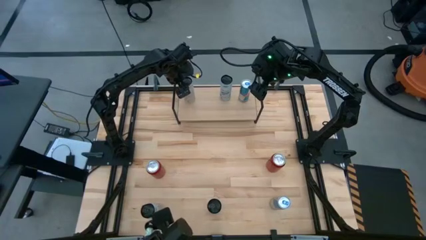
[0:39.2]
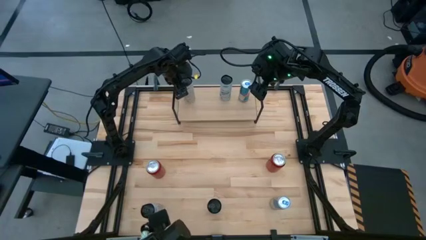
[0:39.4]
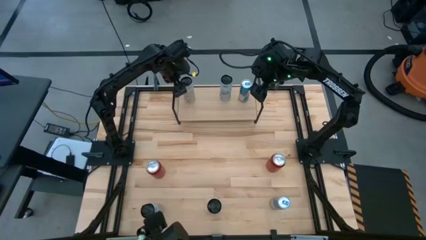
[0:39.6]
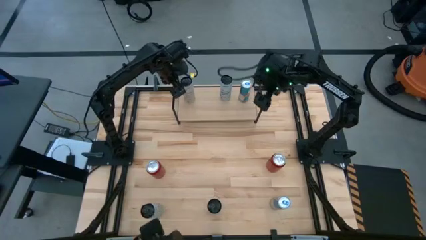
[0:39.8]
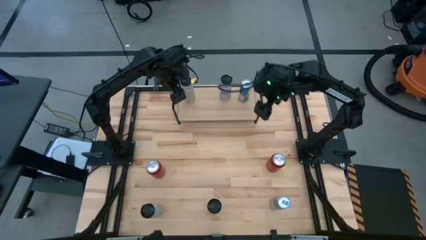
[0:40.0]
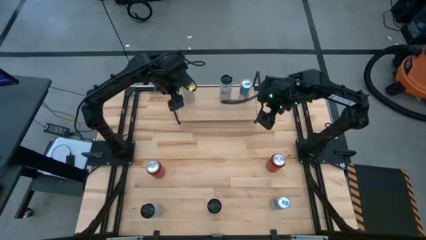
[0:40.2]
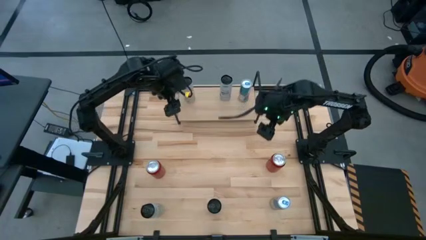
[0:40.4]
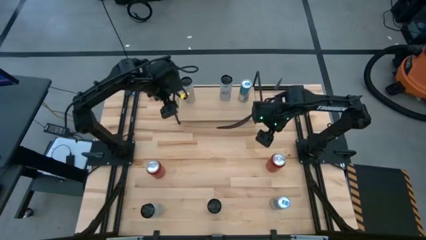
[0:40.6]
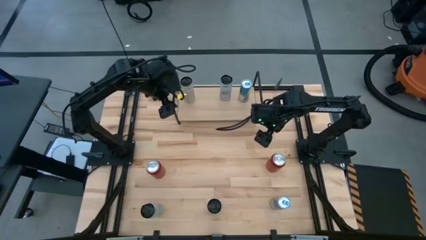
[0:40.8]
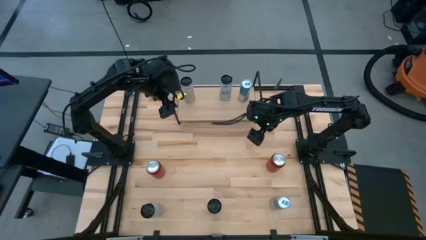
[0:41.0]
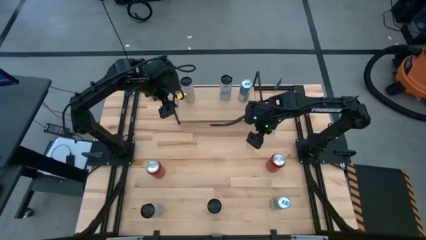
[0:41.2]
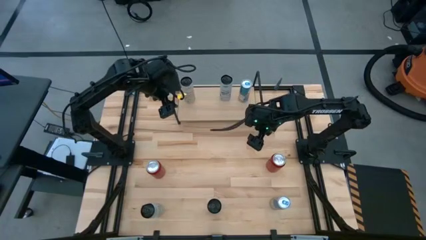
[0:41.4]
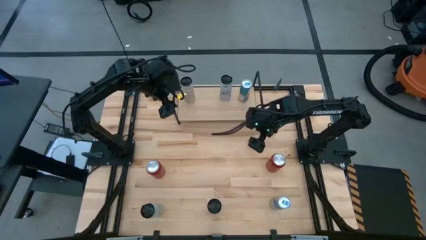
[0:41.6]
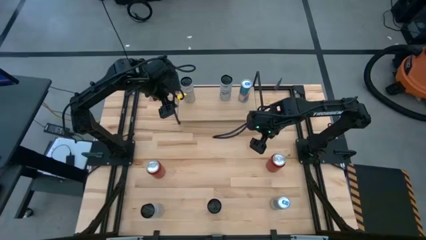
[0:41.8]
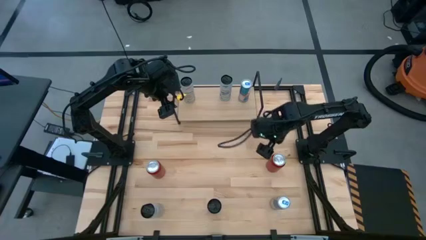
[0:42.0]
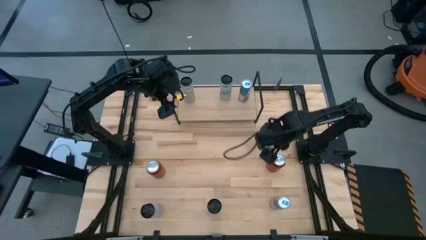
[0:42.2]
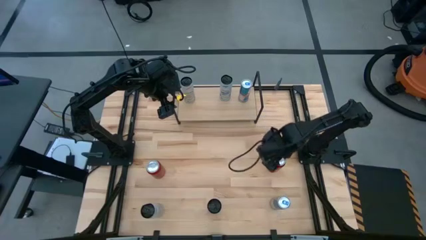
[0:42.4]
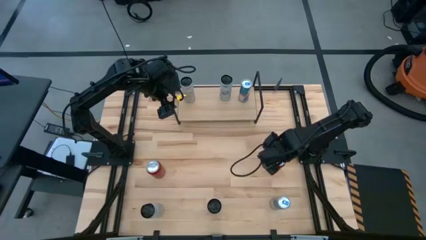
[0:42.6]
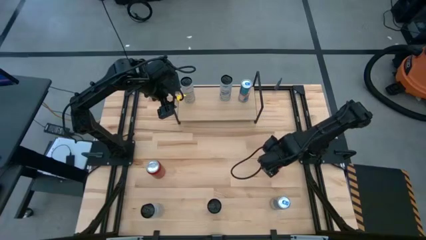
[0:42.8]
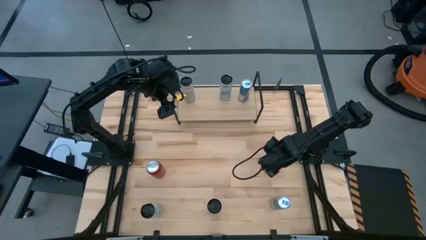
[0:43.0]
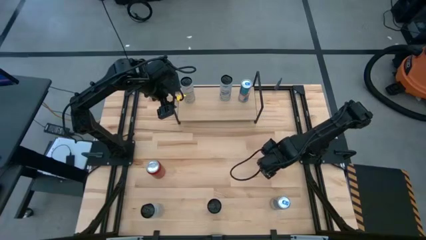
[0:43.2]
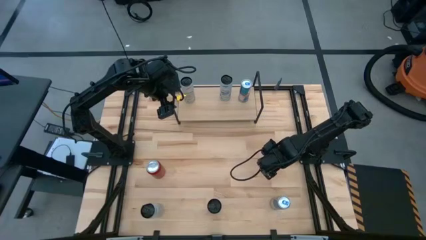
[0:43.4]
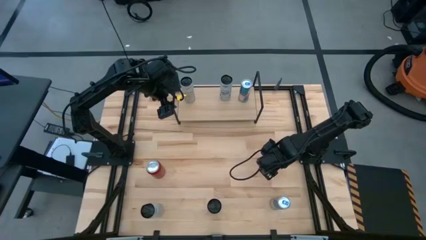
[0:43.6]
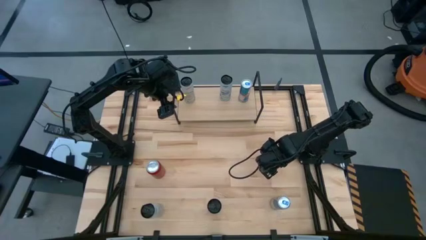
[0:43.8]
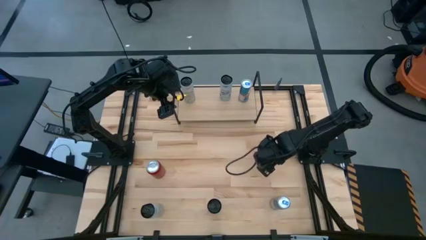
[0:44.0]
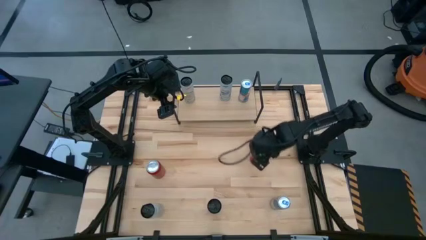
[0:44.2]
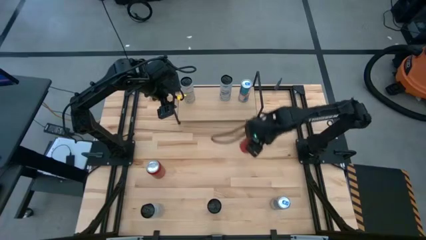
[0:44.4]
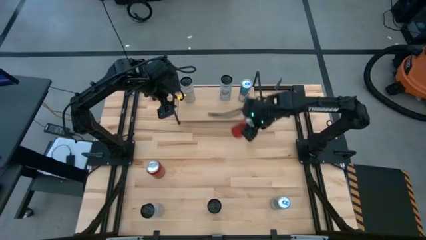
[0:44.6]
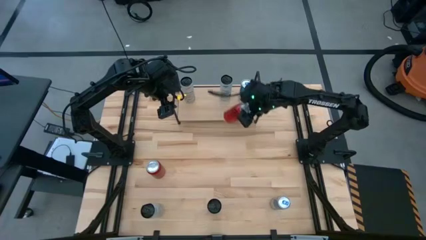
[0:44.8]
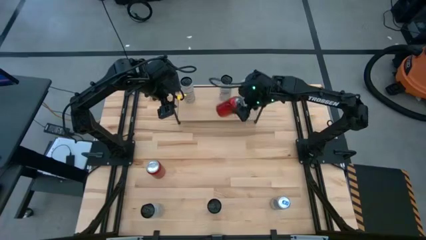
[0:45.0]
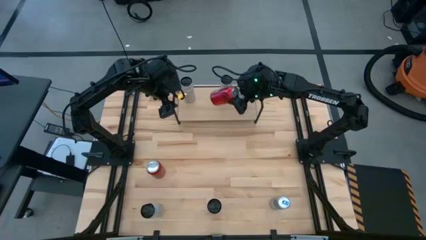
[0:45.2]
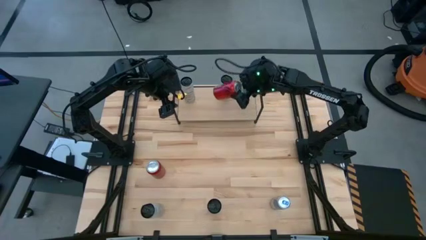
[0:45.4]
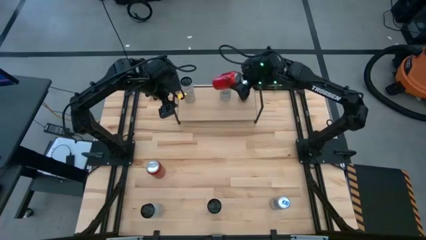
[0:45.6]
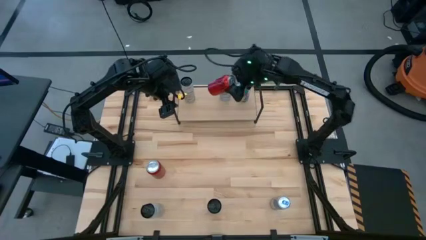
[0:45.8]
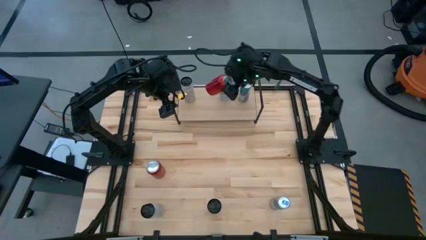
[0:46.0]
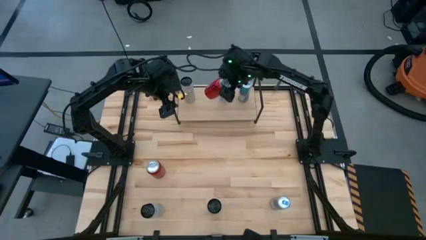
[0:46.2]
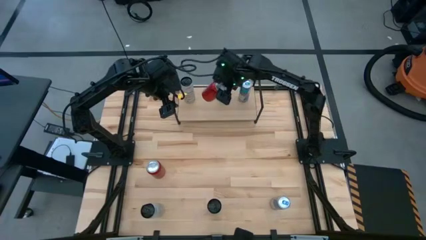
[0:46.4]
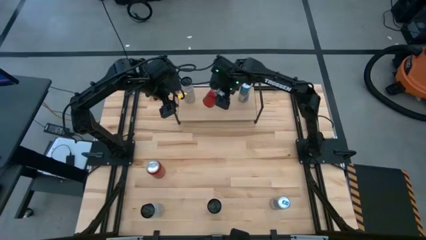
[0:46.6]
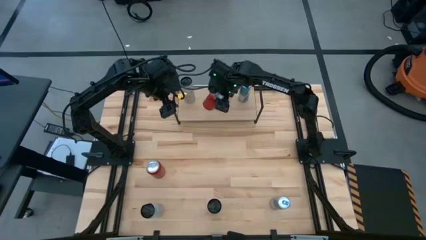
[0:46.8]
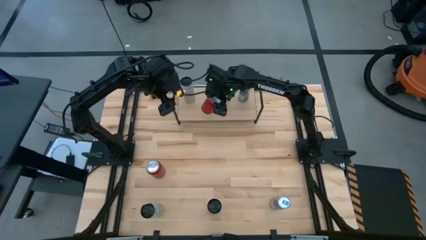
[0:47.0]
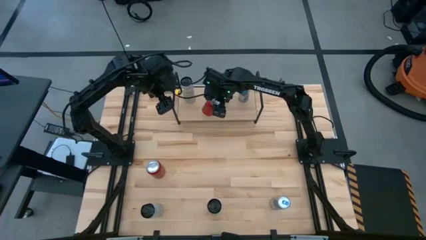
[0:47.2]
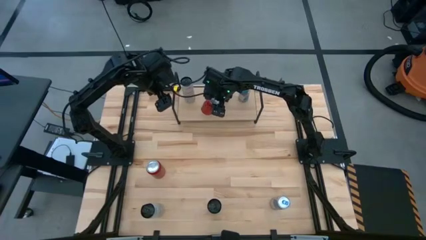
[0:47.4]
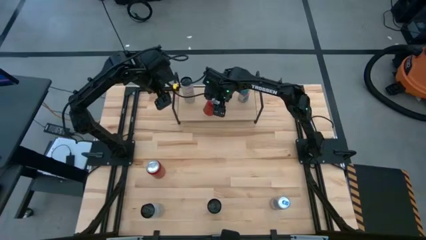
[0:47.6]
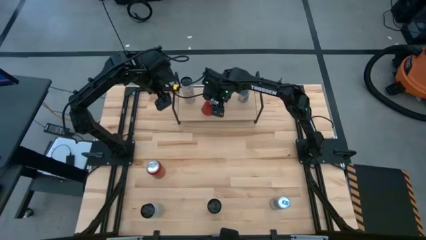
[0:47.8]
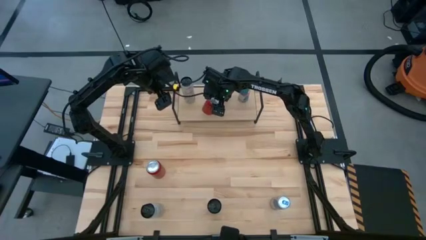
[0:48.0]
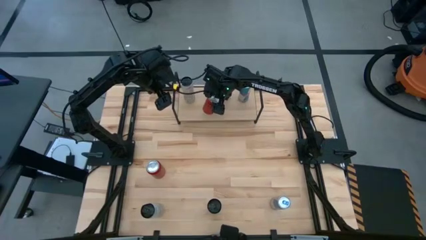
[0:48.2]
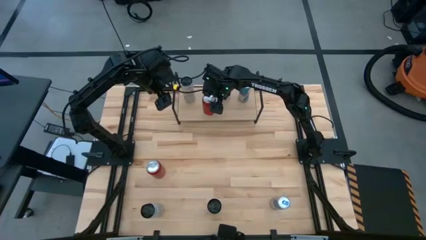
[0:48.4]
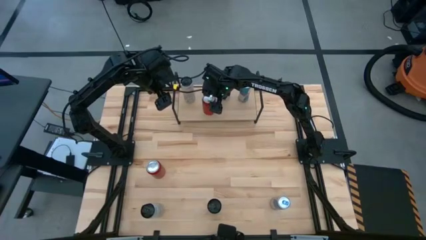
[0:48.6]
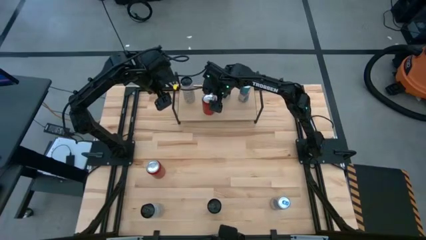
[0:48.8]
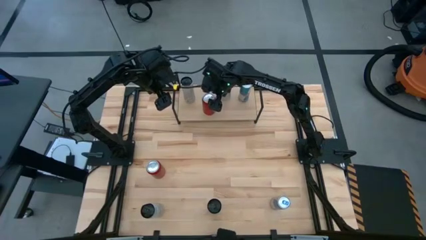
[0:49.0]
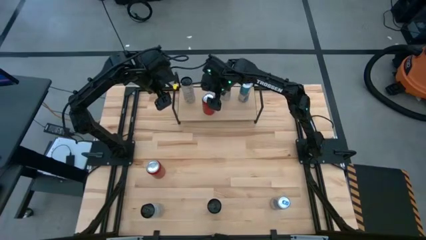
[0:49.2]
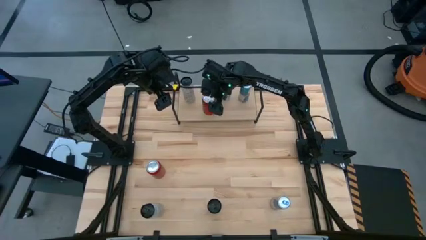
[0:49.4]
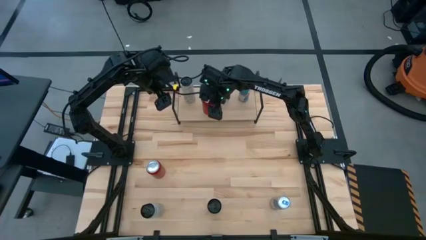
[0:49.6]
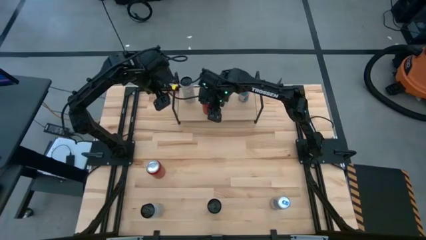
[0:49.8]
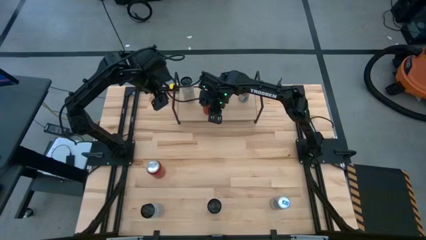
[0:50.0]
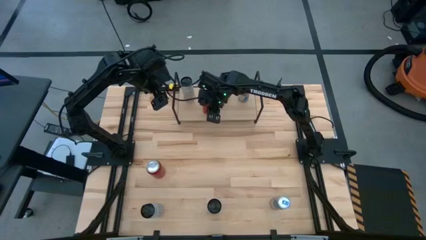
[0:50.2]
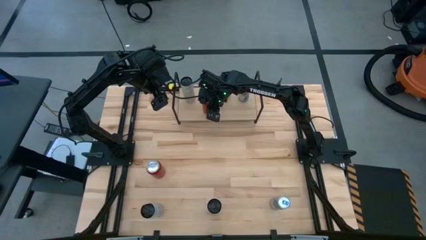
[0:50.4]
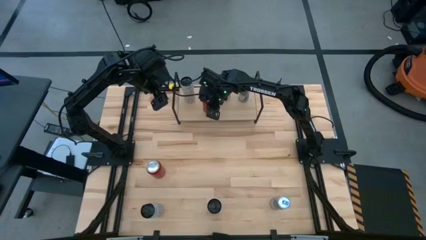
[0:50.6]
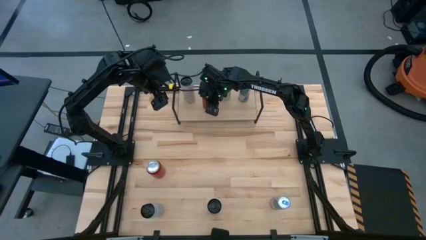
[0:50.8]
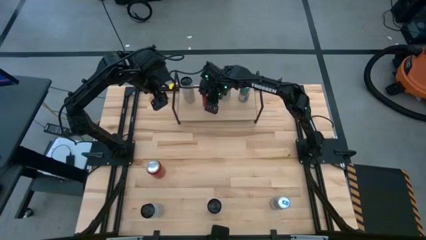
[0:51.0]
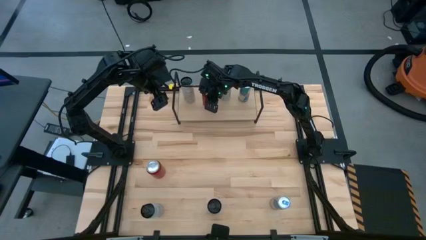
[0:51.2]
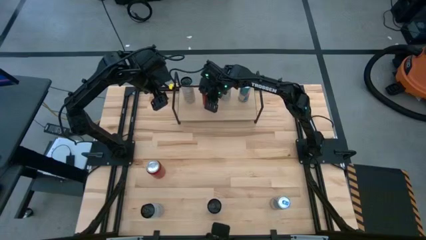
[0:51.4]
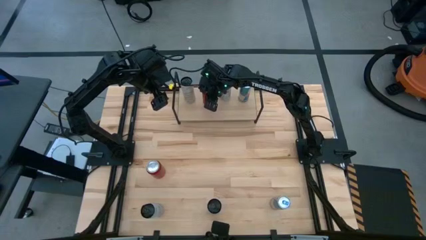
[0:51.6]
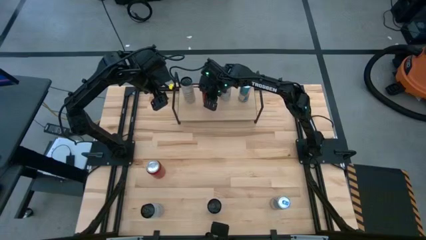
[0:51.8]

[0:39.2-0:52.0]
Task: Place canned beverage on shelf
Put the right red soda can on the shelf
